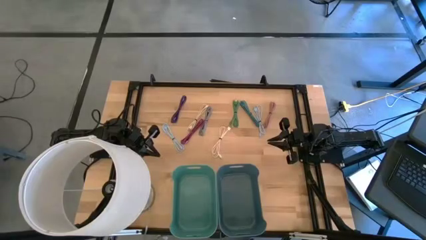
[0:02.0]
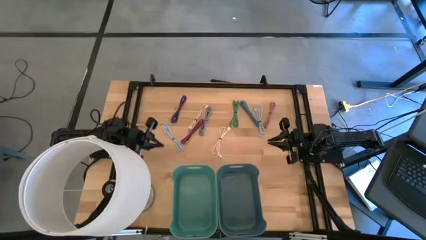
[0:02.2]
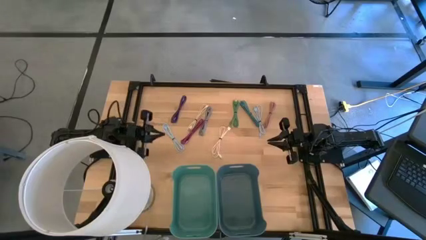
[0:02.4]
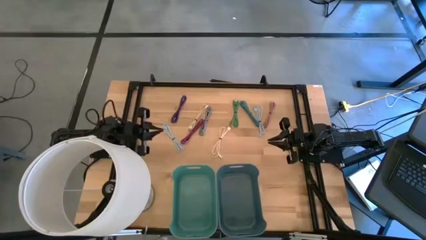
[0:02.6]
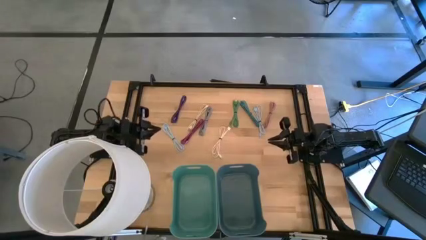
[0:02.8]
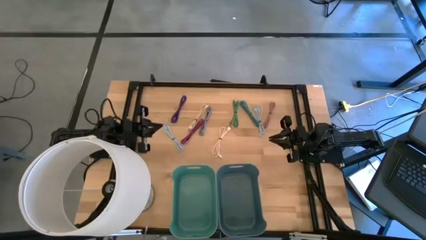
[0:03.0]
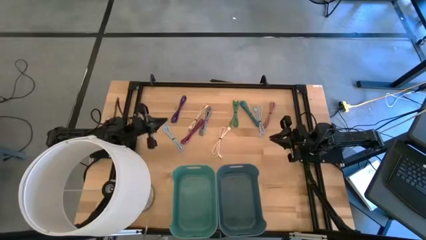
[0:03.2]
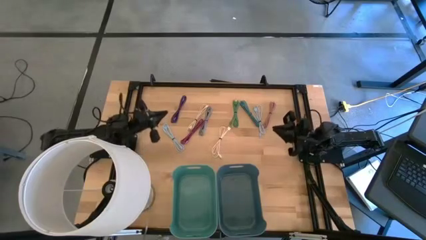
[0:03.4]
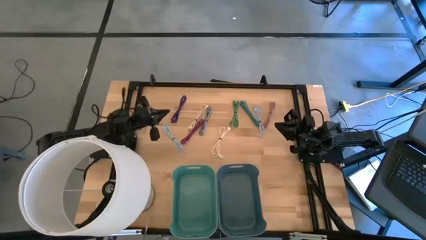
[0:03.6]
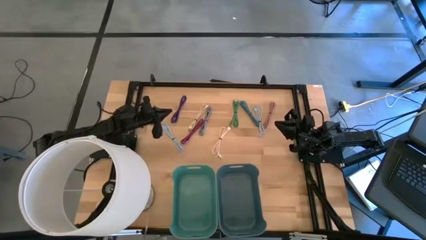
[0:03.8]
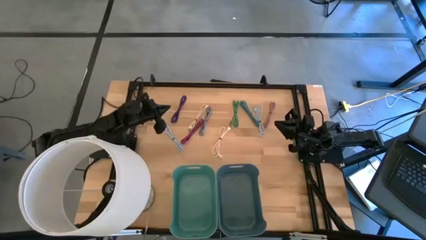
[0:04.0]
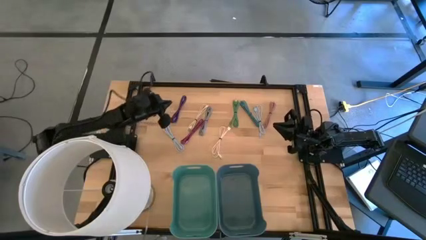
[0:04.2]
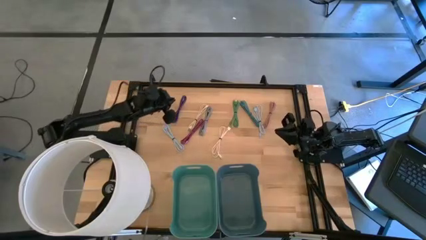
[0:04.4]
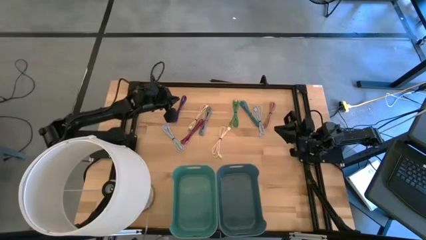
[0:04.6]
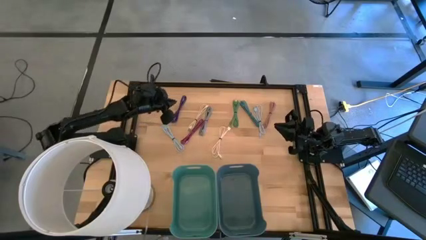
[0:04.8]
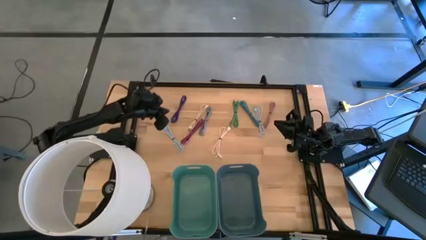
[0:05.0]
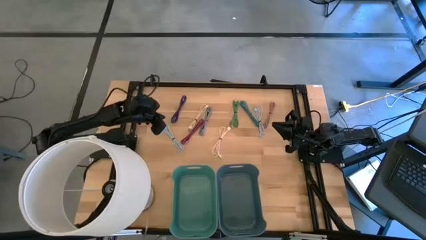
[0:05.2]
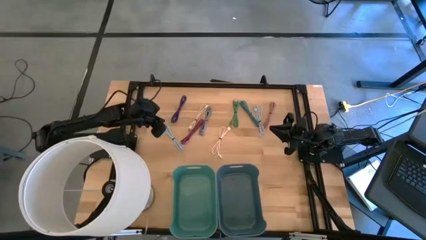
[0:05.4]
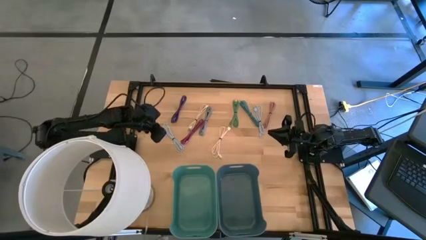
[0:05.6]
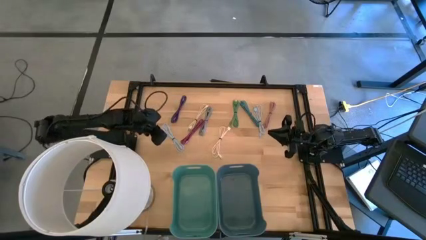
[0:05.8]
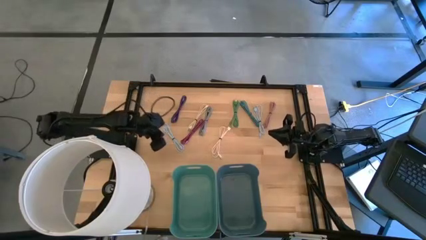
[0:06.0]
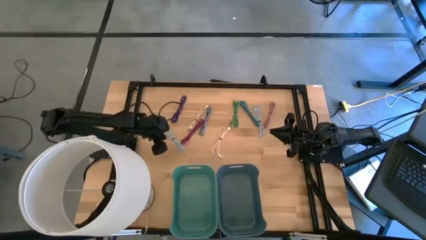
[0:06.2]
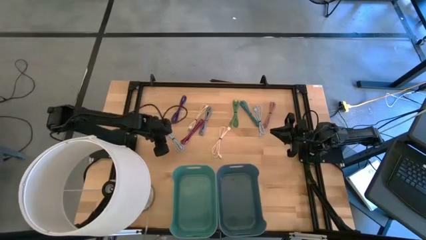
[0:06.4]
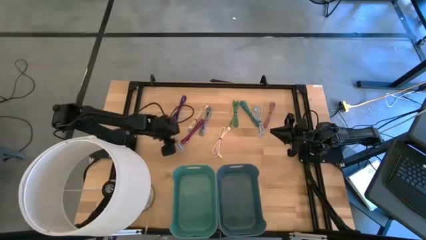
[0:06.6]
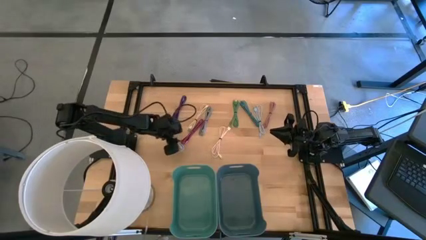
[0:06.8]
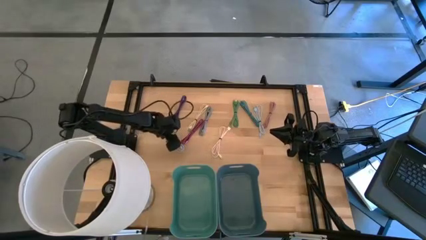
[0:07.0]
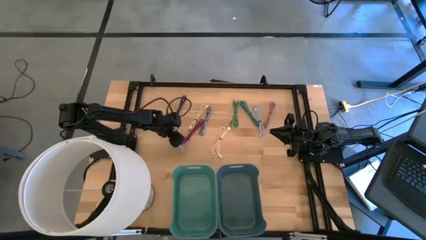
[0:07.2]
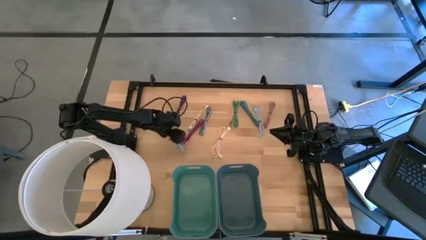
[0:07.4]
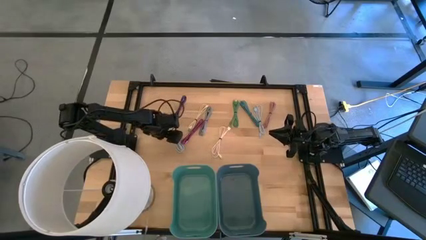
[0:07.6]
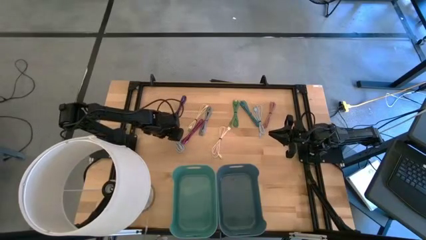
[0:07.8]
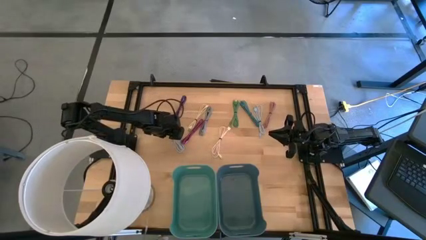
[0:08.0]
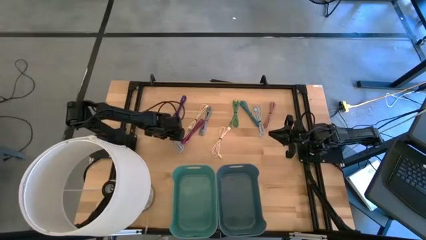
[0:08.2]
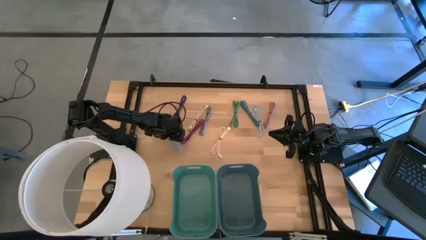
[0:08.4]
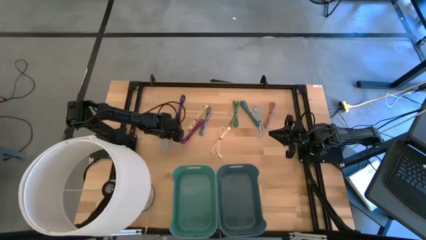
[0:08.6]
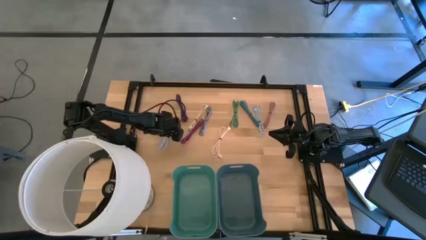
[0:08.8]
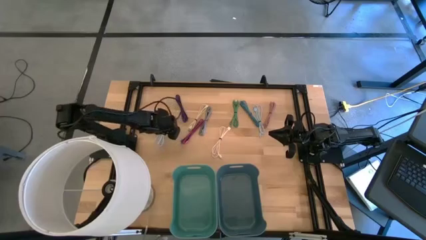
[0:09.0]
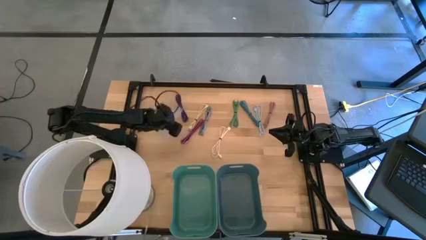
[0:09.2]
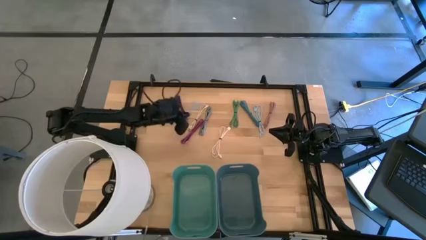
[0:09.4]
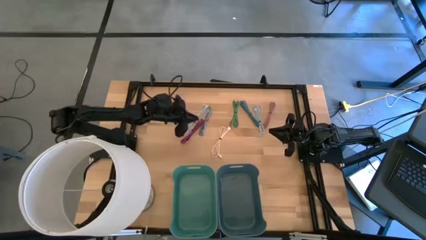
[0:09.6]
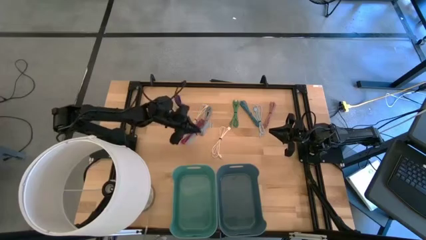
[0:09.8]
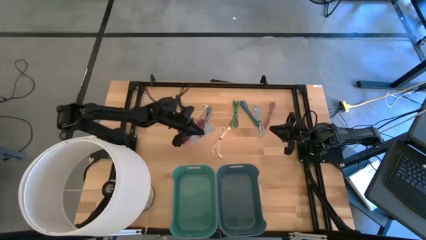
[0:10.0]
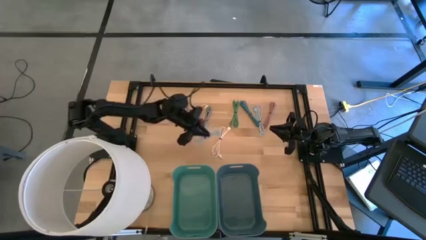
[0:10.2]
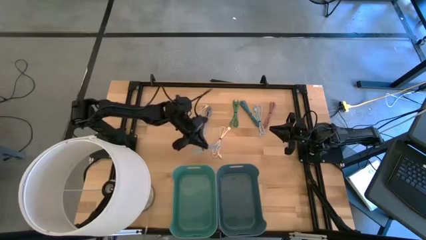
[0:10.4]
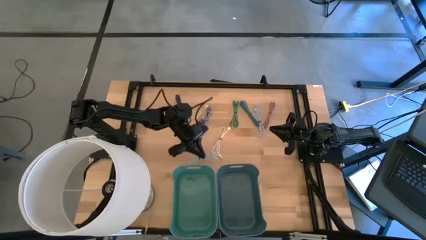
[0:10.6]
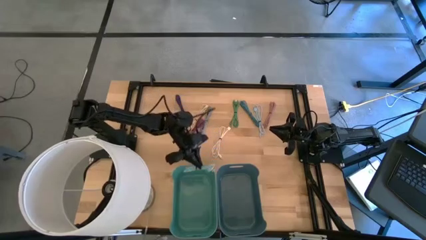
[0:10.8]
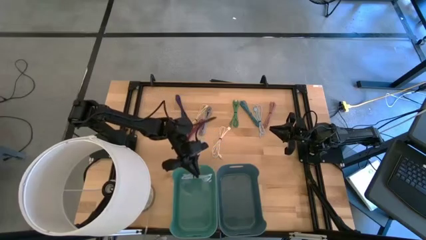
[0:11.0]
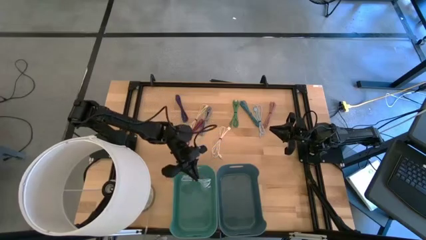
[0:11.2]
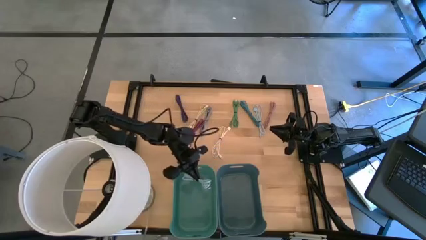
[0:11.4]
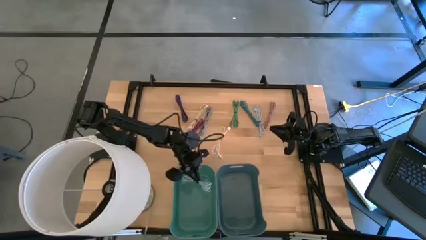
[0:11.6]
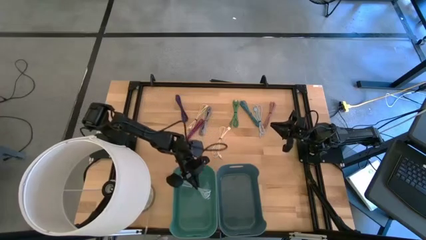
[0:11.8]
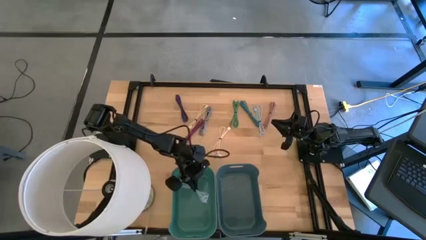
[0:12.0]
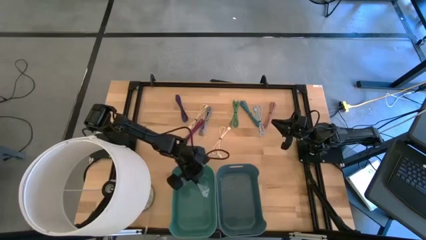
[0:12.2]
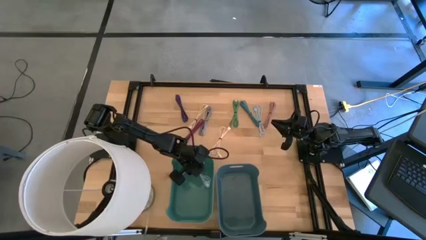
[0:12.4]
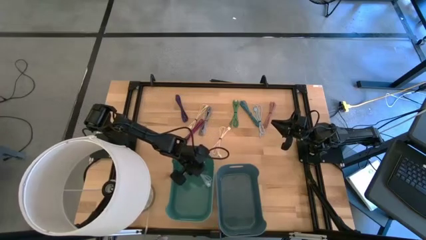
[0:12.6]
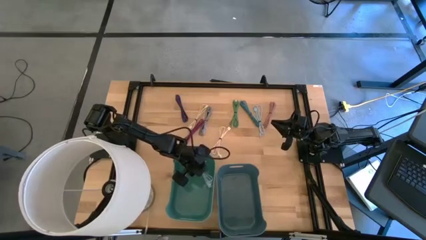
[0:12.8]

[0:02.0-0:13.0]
Put the left light blue charger cable into the green bin

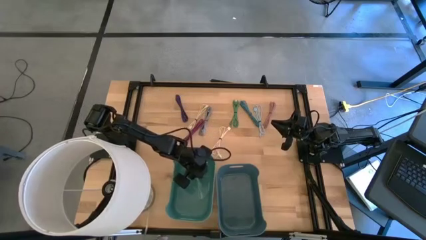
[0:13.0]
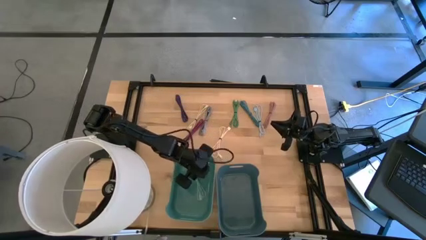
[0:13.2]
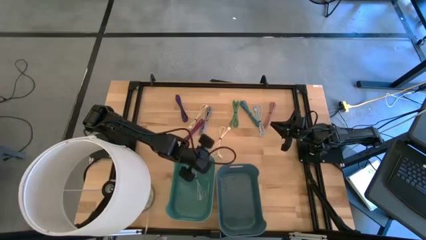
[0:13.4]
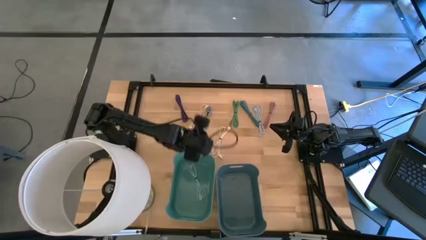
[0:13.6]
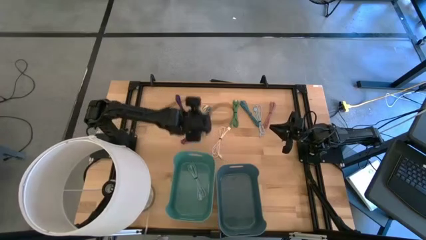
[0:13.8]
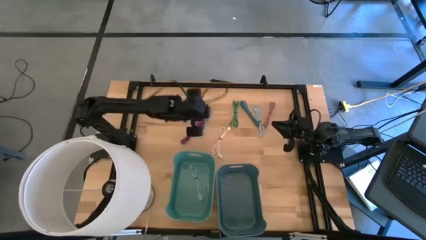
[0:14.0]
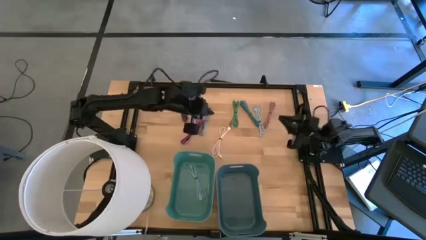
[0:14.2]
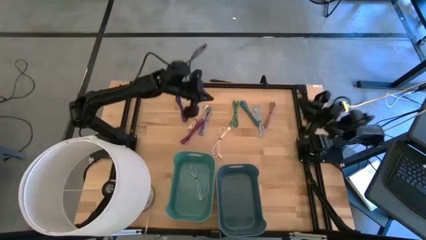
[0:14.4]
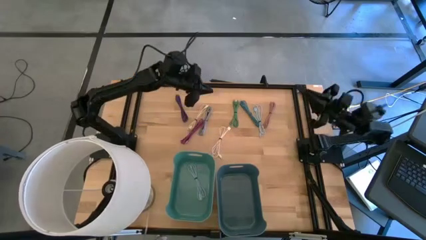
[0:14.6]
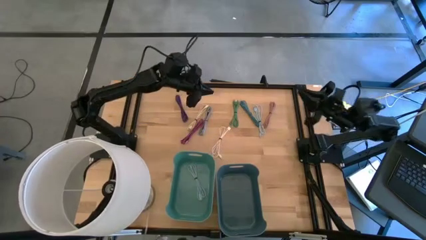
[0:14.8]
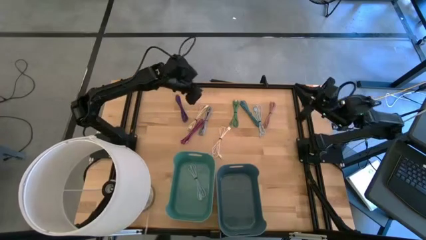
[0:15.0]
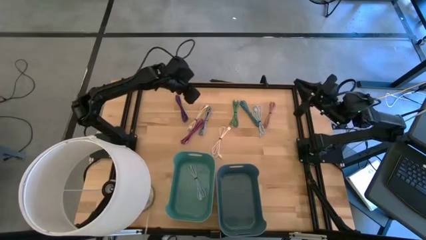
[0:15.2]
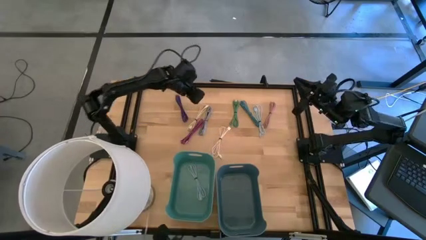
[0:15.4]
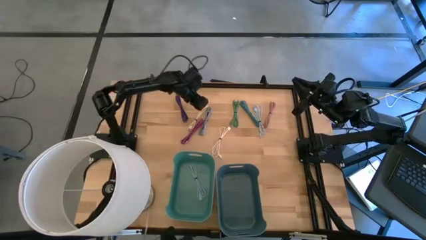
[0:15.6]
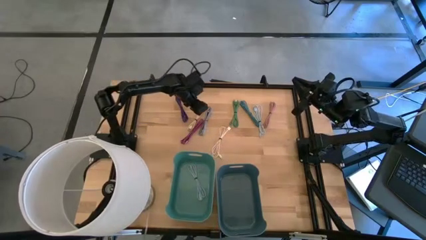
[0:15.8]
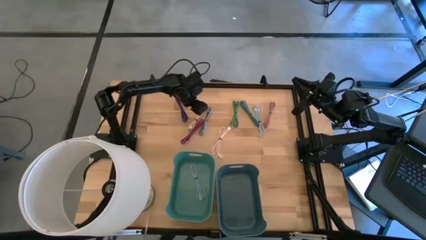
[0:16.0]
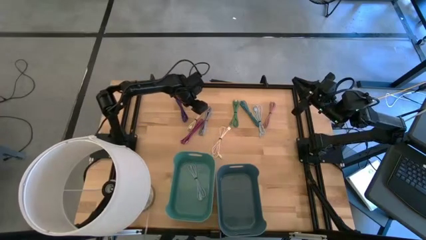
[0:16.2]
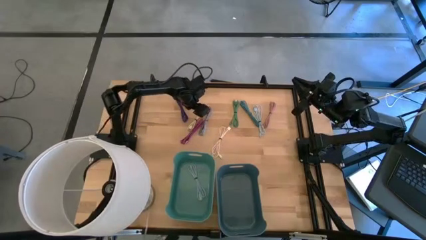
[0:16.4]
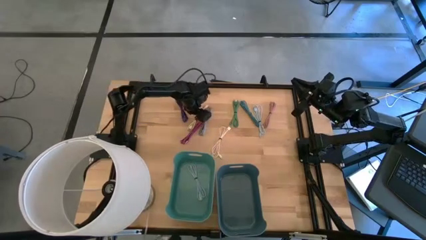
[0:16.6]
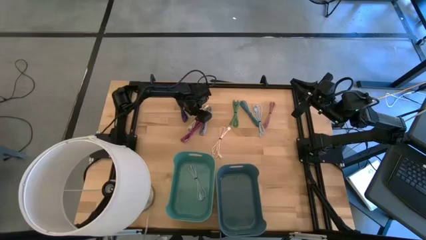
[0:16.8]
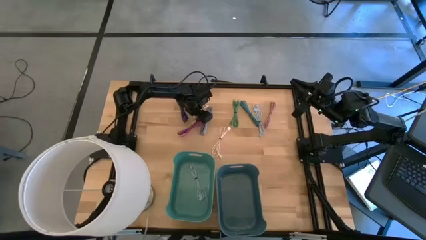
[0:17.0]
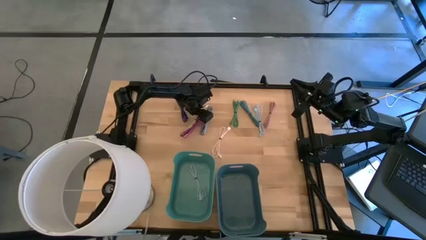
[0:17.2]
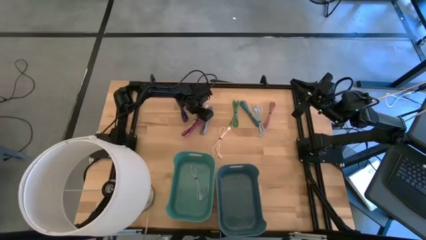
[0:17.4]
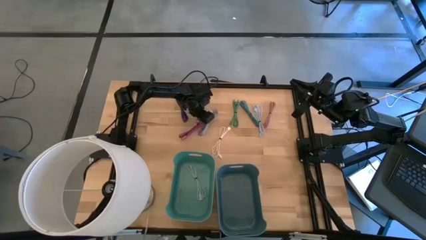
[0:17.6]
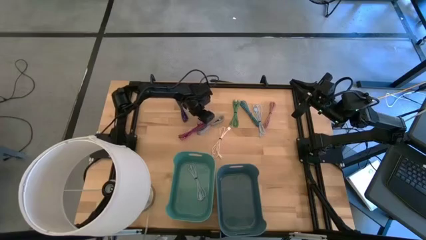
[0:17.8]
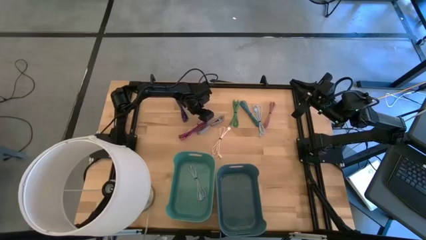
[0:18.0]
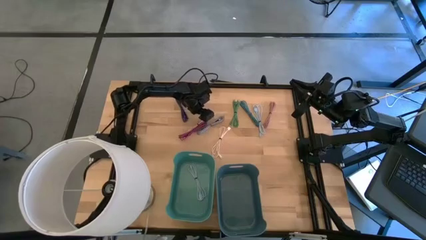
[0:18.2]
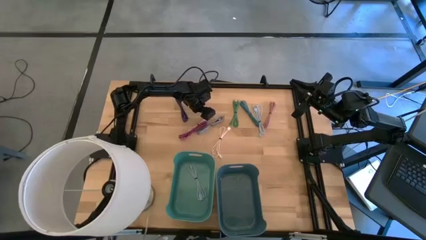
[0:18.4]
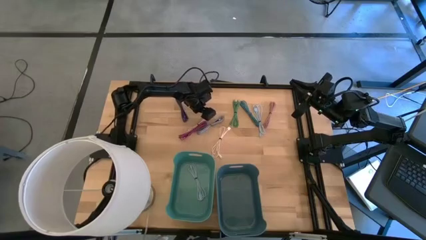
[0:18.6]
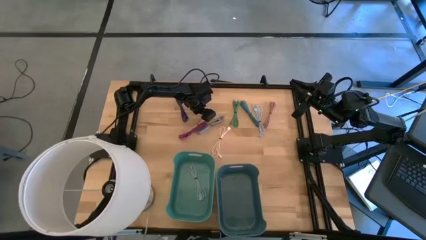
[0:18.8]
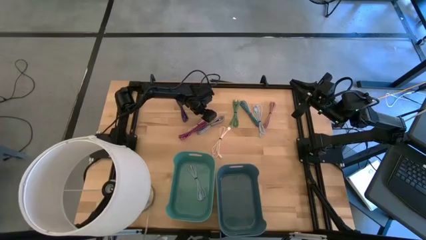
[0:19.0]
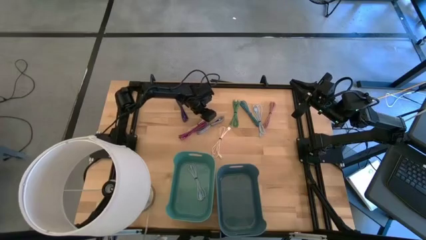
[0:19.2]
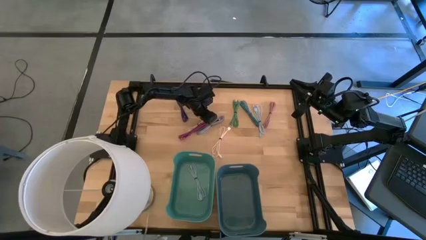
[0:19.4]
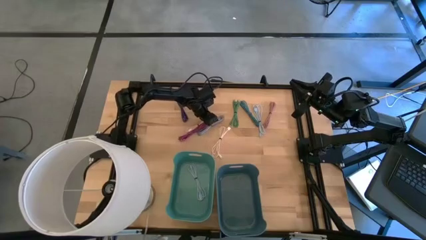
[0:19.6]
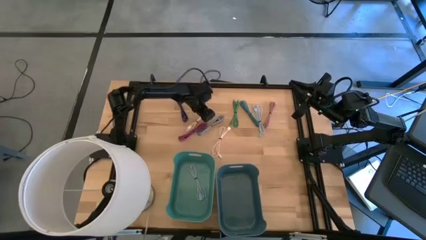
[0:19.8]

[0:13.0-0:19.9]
Put the left white charger cable into the green bin
